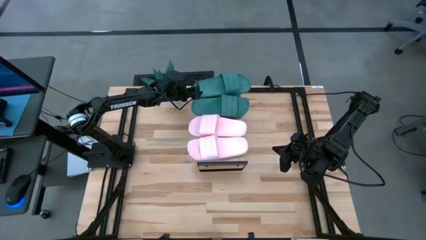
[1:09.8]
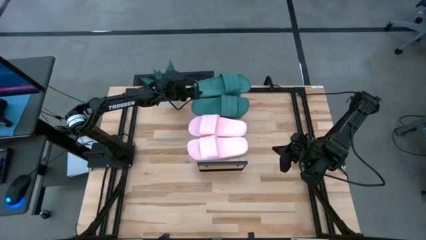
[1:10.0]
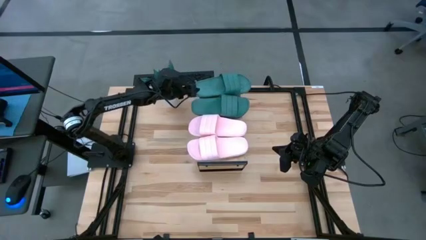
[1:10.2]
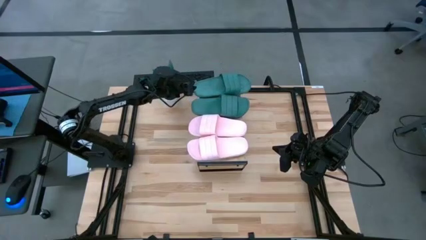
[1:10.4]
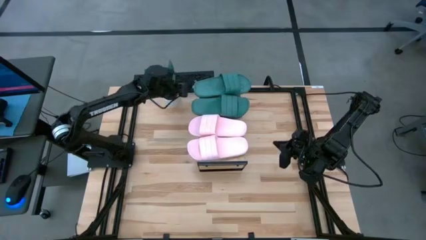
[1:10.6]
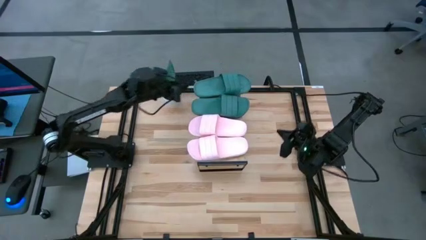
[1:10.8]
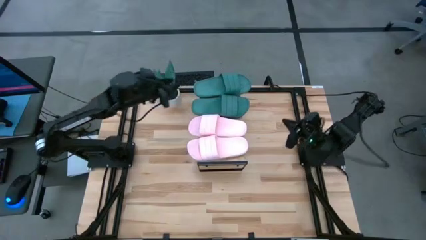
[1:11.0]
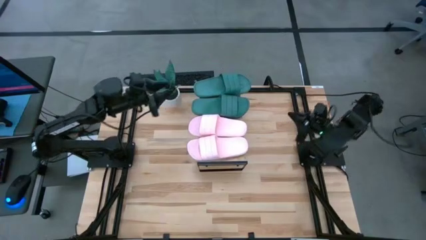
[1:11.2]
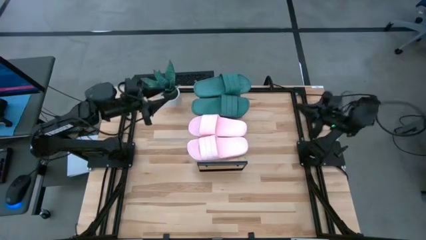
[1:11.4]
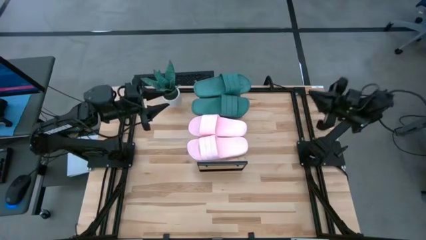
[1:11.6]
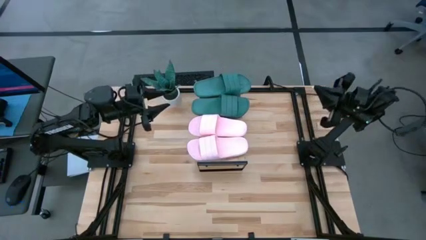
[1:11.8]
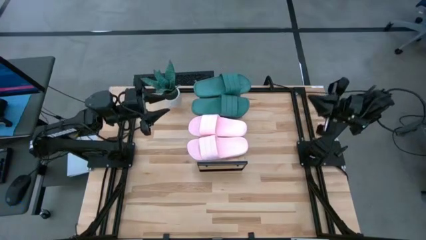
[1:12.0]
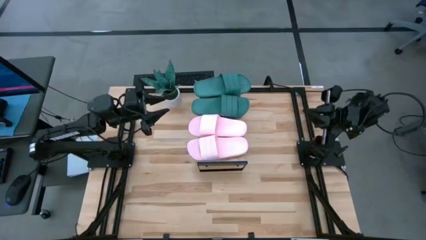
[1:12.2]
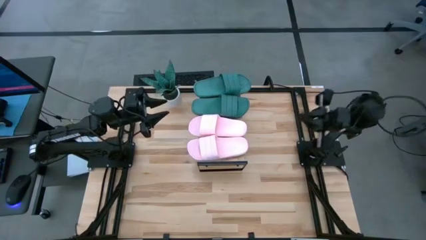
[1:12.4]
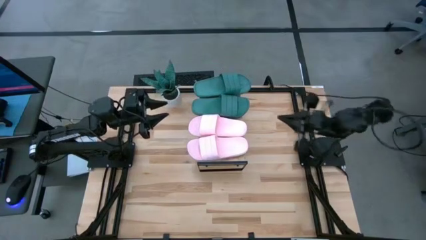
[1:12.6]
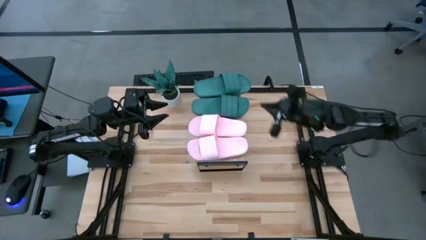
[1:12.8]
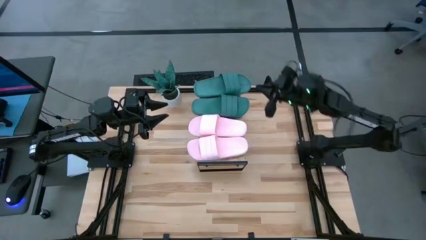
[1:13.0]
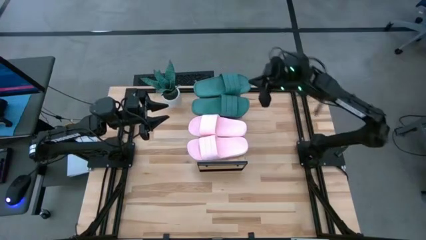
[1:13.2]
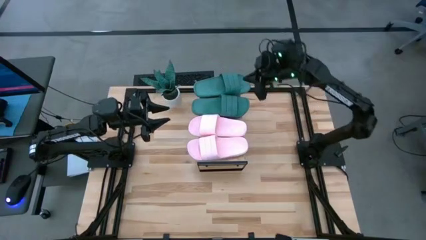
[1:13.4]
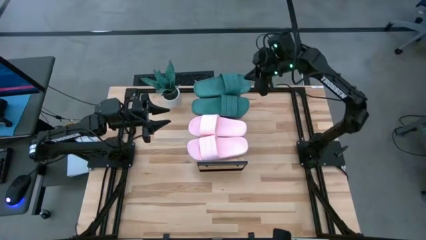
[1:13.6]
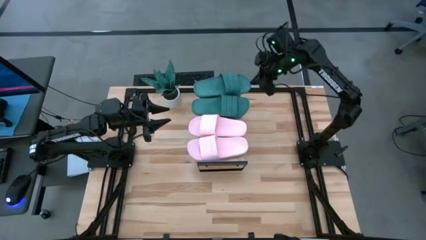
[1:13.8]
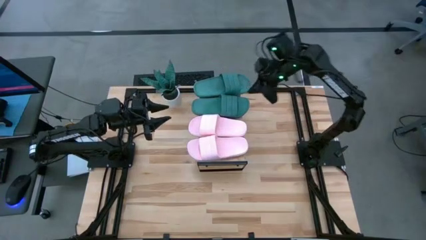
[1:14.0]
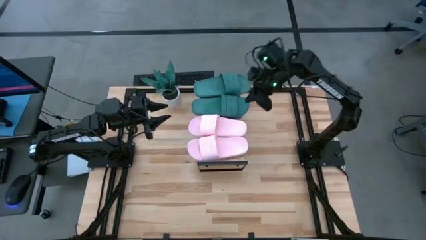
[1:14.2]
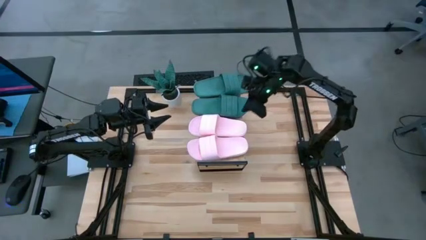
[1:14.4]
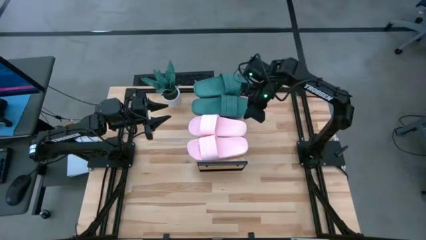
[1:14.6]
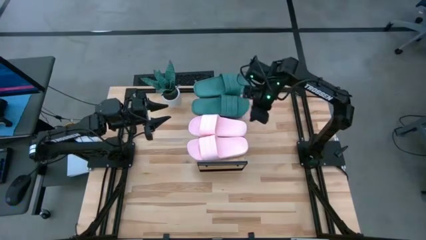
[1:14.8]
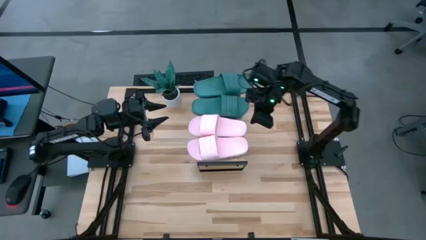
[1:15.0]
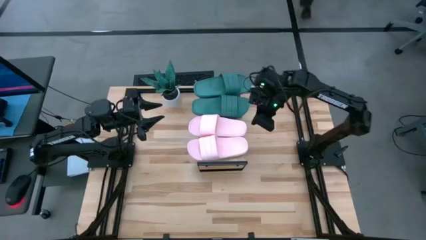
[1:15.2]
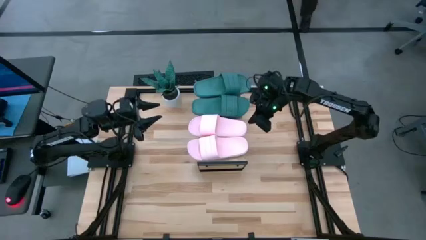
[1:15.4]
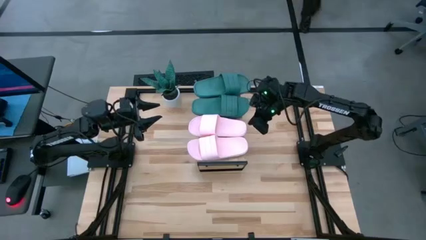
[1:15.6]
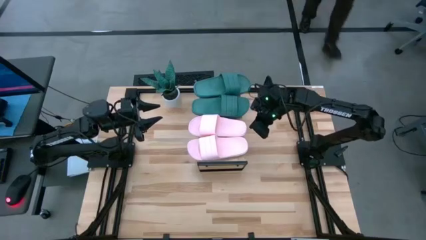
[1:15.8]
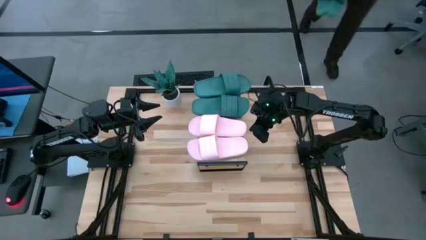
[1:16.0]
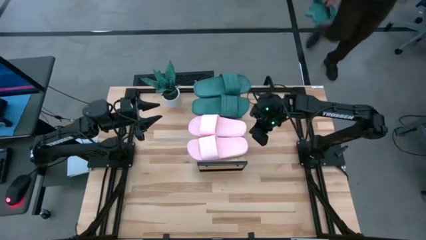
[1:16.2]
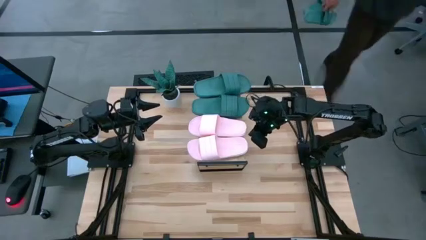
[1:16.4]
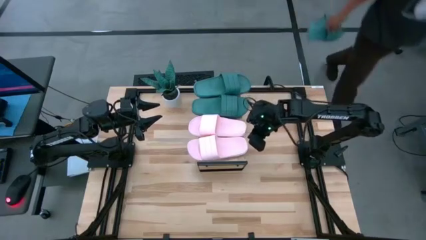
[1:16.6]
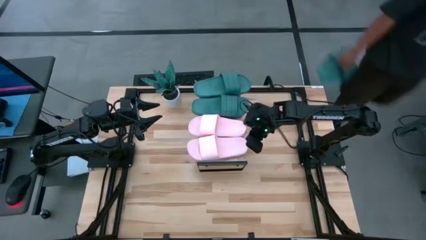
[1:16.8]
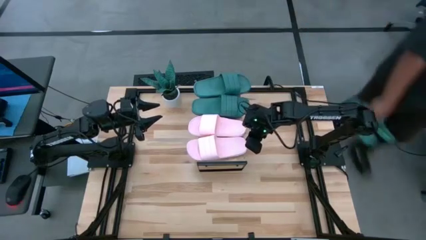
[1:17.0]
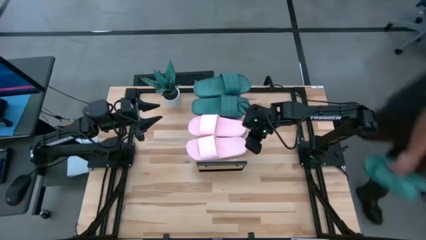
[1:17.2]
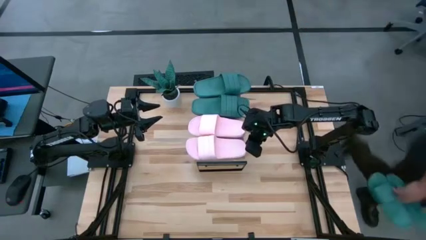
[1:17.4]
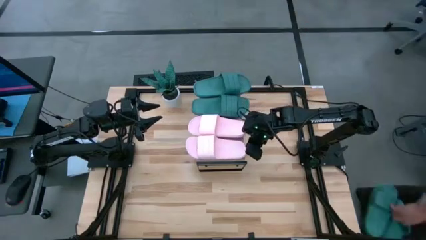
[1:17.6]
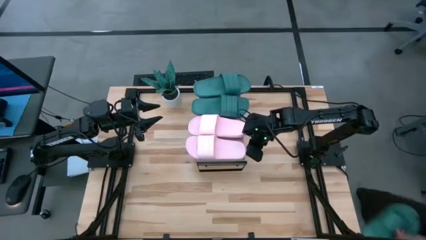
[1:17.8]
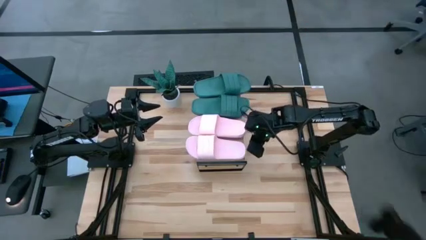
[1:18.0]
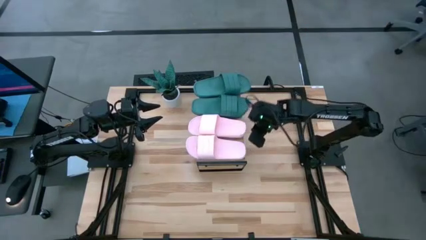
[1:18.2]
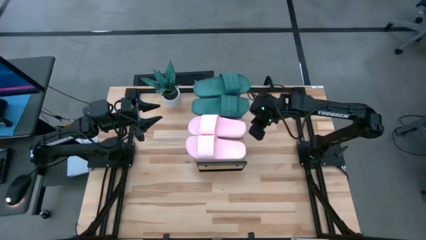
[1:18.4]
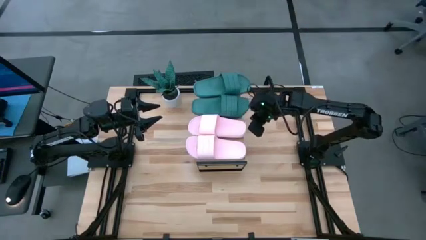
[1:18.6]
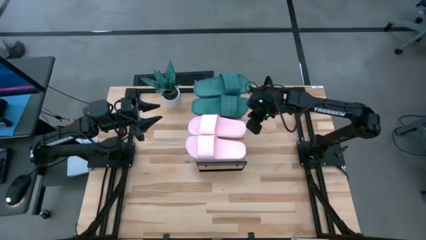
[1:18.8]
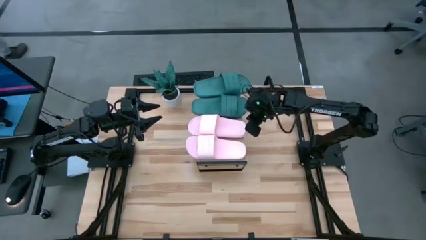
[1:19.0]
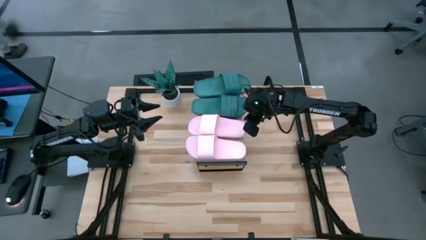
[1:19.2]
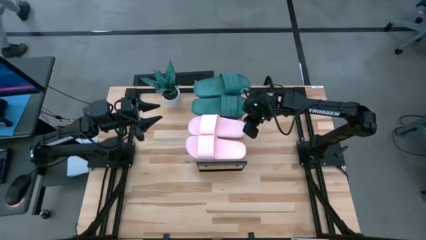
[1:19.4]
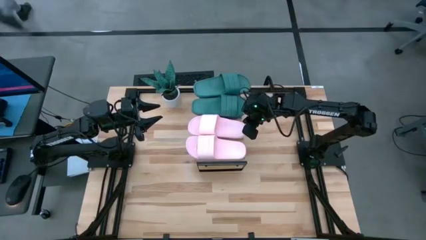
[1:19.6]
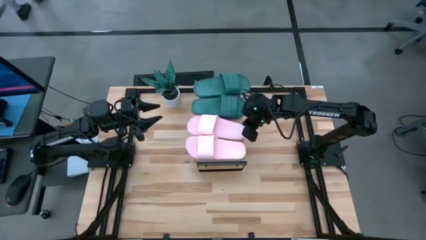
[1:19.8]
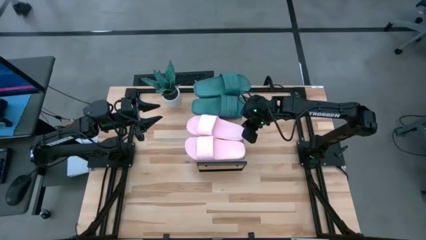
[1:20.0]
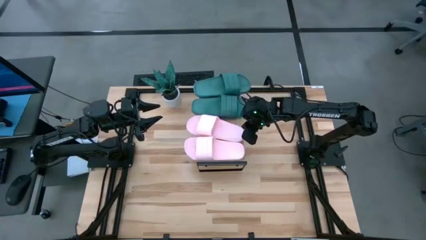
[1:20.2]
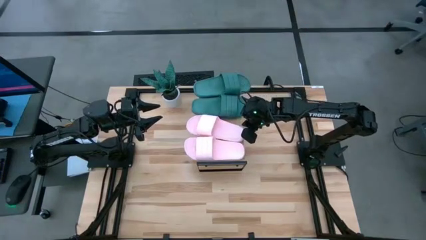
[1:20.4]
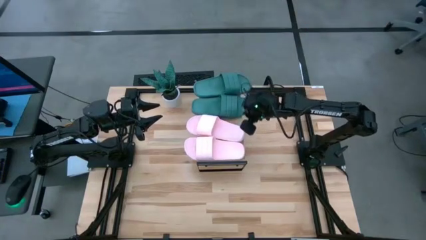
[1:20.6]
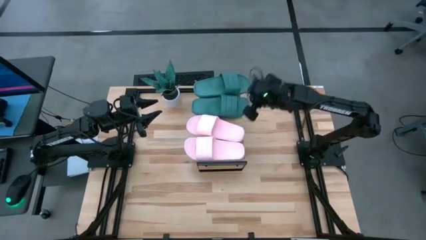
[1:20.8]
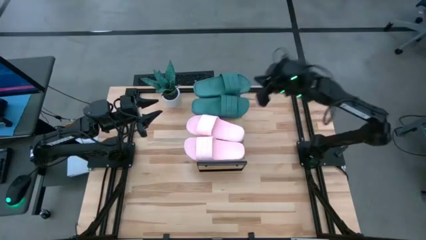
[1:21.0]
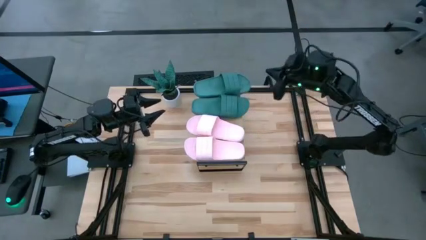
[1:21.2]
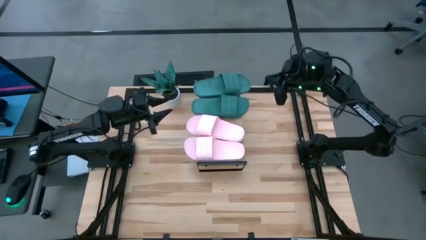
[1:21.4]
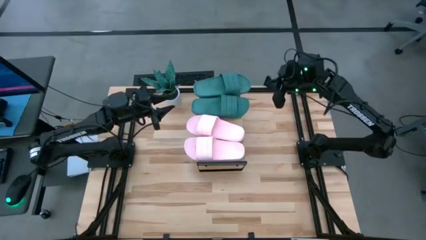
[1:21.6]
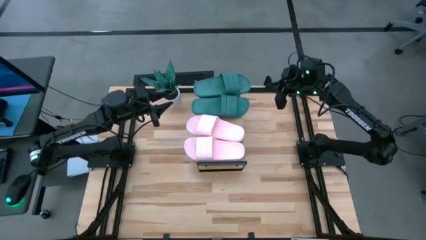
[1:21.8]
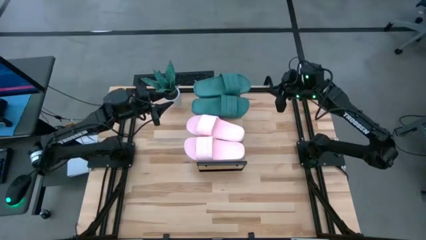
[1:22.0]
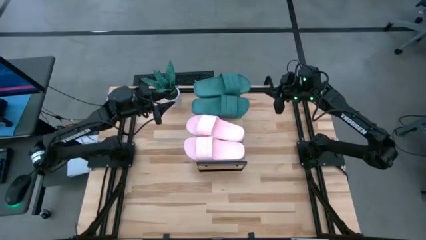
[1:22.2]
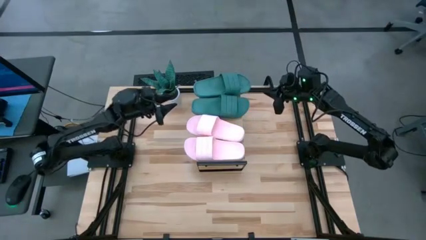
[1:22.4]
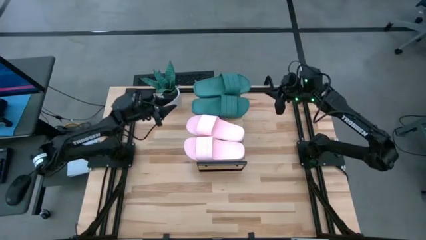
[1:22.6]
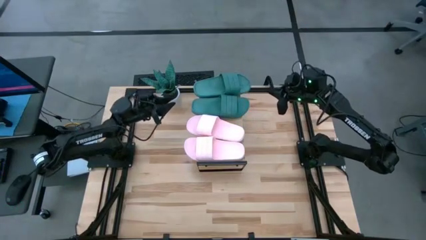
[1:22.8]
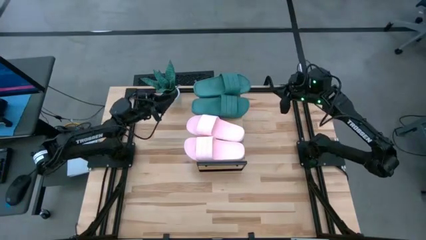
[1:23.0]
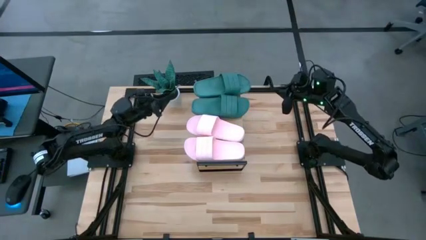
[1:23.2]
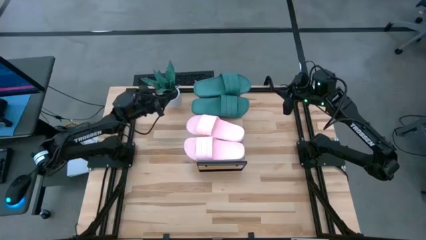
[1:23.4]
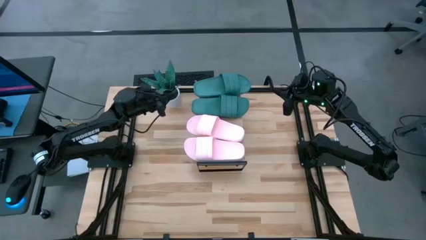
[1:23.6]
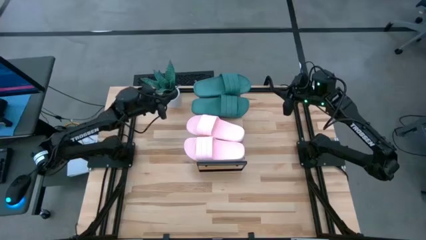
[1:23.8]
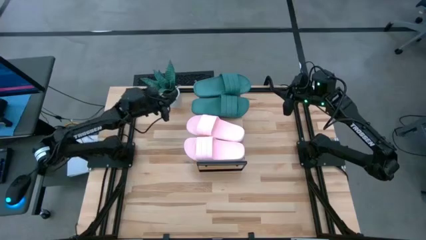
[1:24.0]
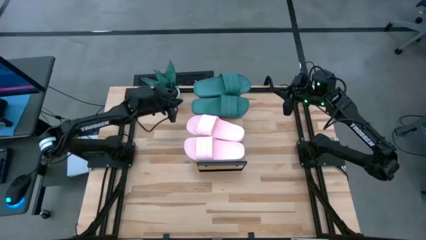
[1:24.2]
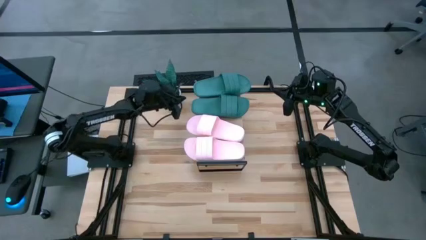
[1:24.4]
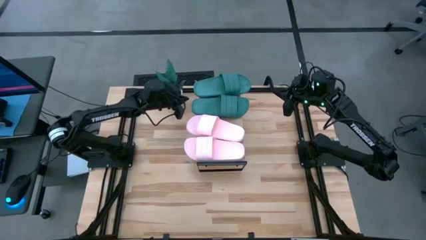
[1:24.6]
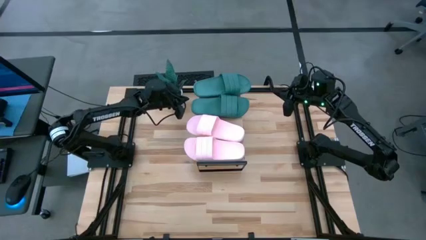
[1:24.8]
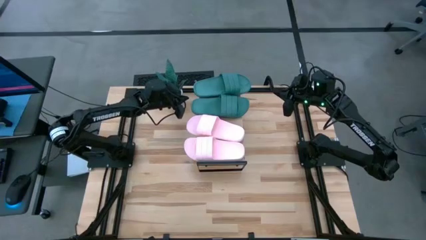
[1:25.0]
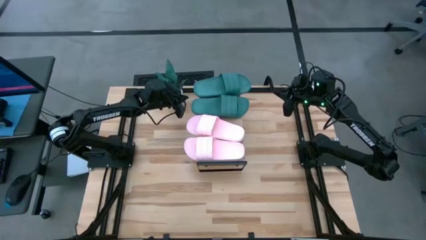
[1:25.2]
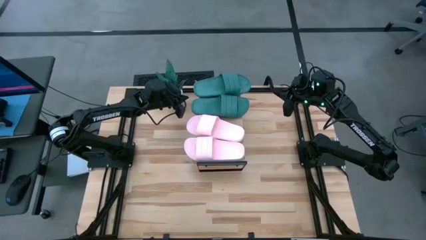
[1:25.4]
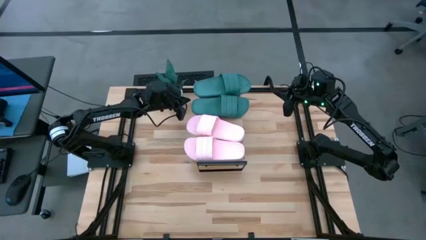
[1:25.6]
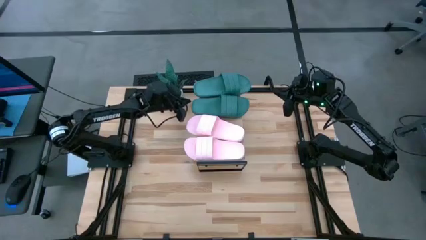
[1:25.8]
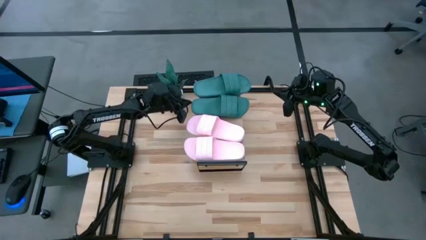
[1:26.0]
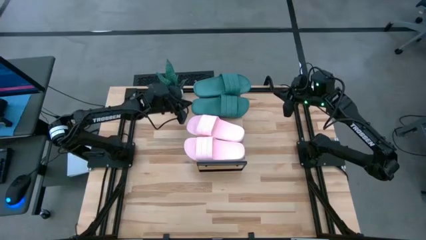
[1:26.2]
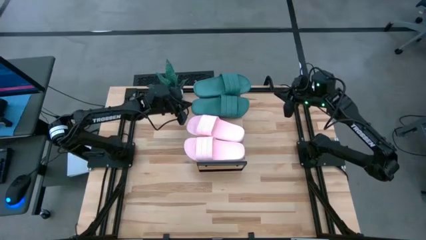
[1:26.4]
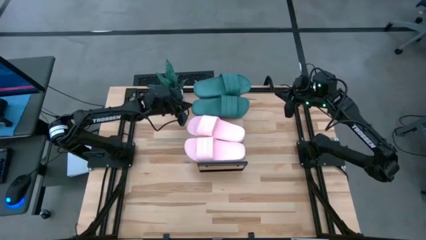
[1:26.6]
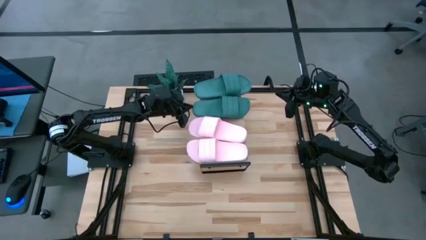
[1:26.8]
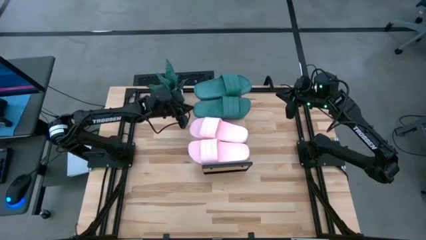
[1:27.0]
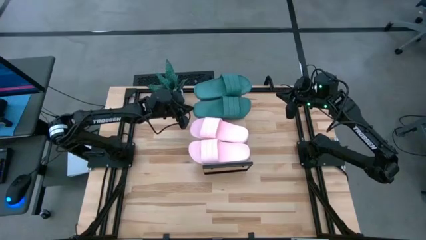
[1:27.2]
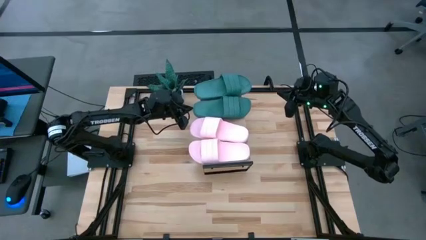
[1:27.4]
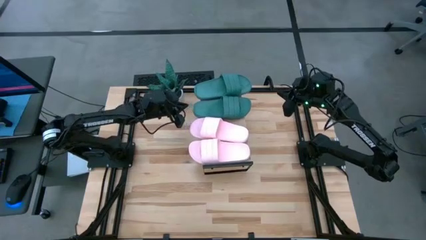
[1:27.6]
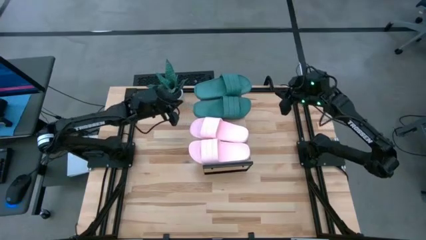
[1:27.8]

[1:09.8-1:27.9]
Task: Pick and place slides into the shelf
Adjust the slippers on the shelf
